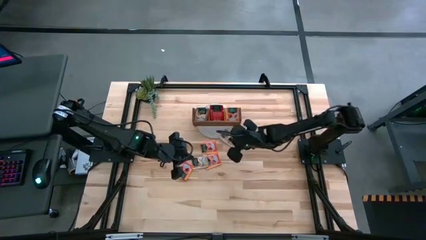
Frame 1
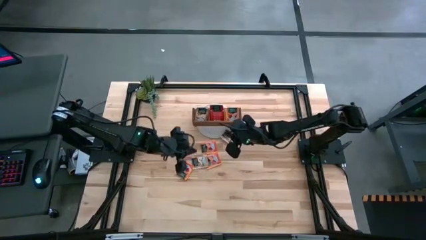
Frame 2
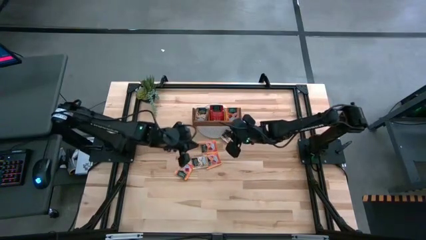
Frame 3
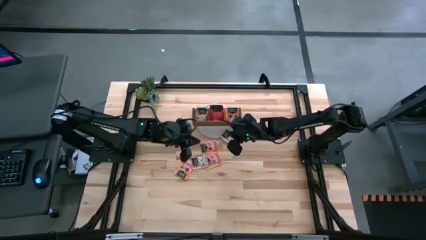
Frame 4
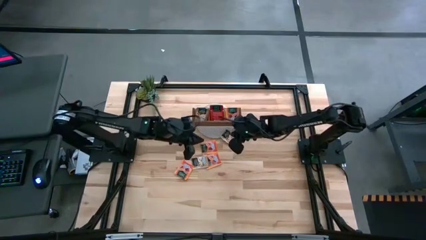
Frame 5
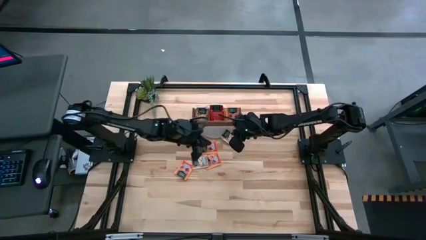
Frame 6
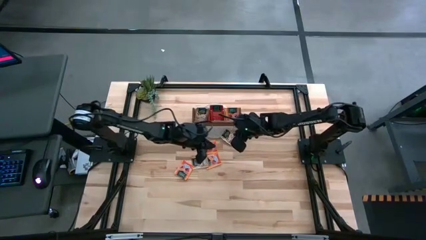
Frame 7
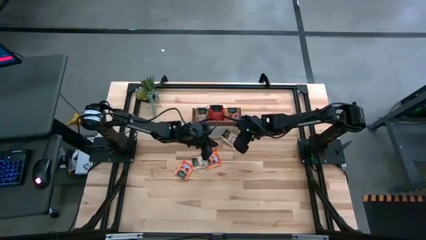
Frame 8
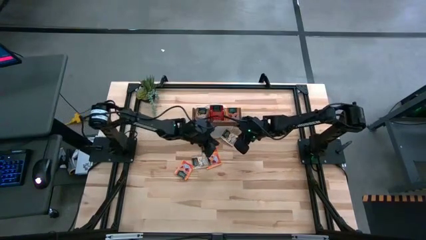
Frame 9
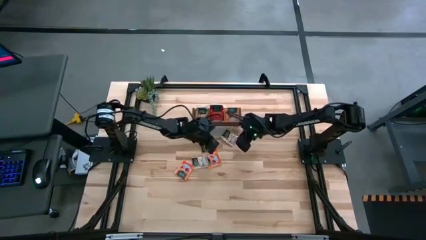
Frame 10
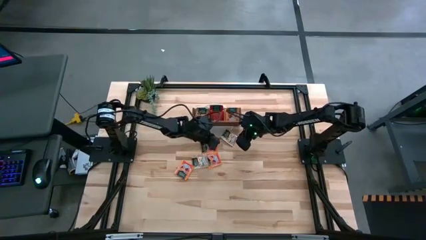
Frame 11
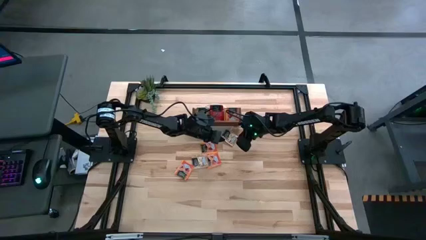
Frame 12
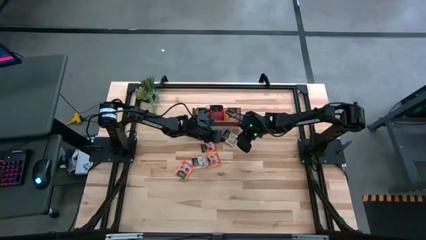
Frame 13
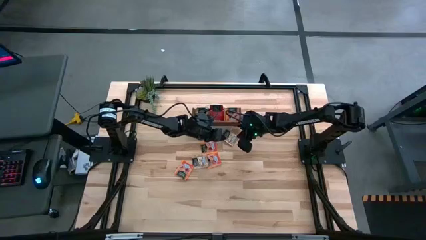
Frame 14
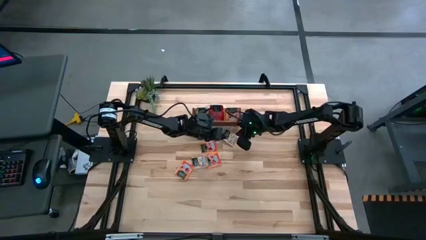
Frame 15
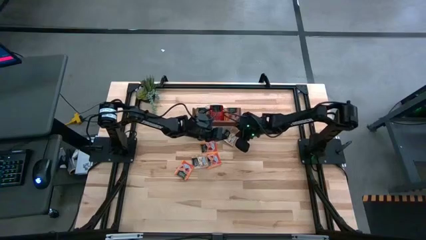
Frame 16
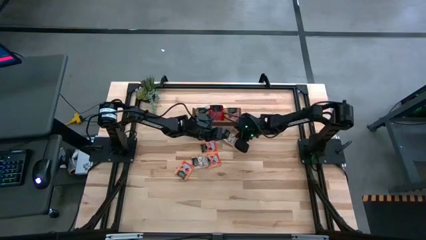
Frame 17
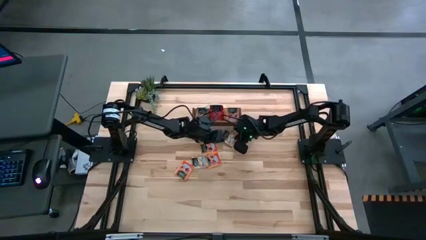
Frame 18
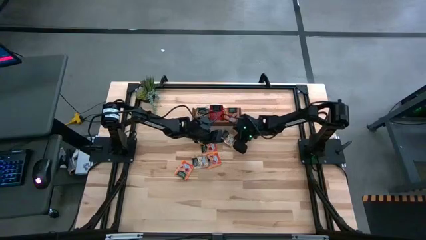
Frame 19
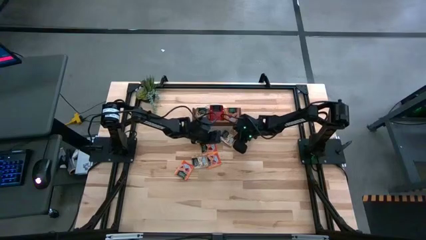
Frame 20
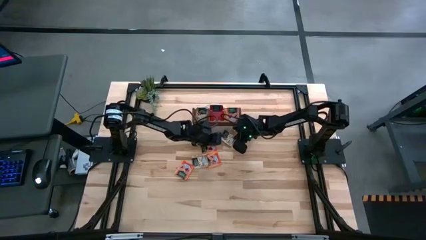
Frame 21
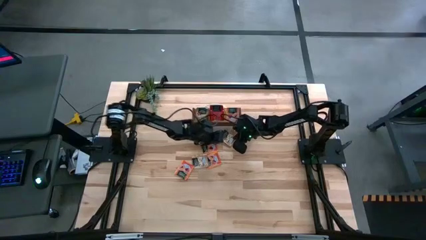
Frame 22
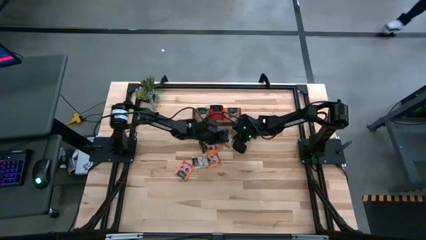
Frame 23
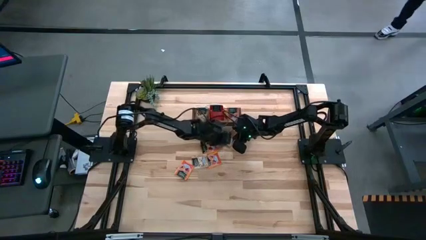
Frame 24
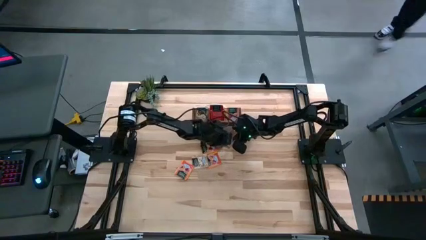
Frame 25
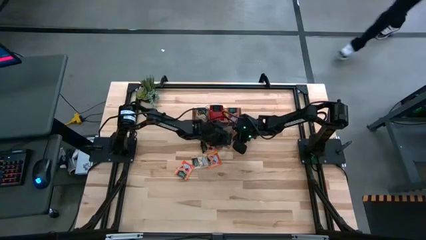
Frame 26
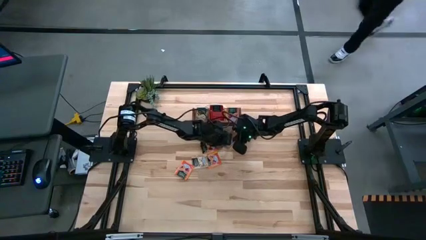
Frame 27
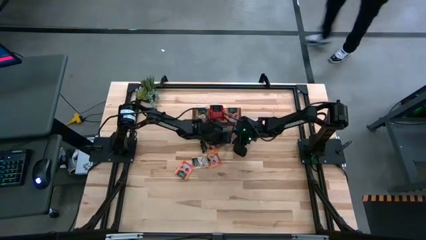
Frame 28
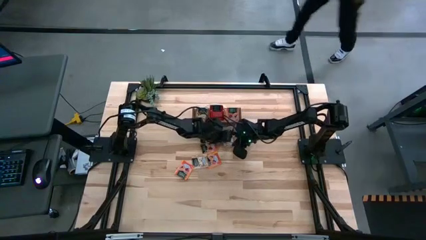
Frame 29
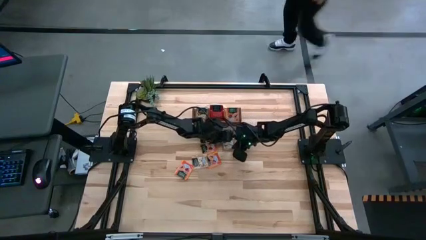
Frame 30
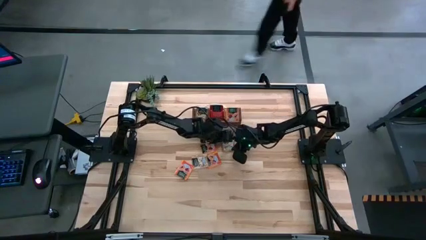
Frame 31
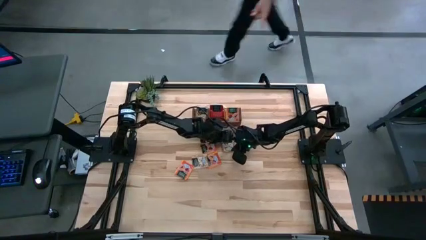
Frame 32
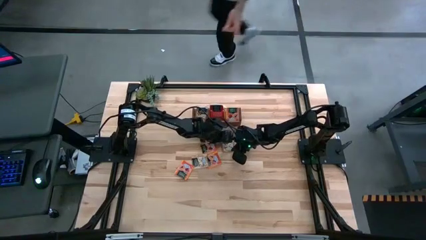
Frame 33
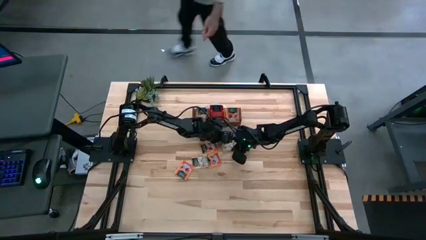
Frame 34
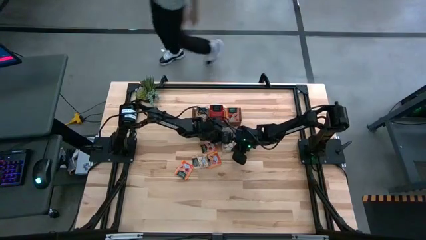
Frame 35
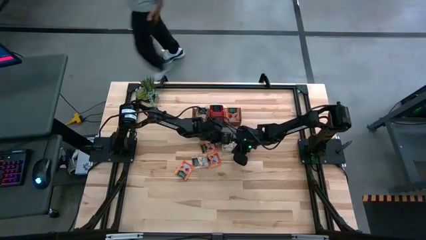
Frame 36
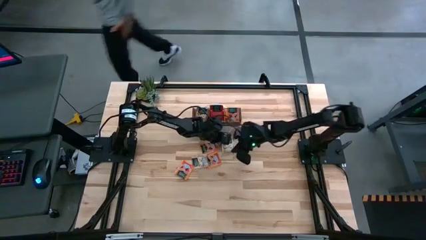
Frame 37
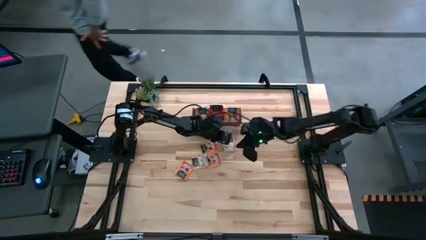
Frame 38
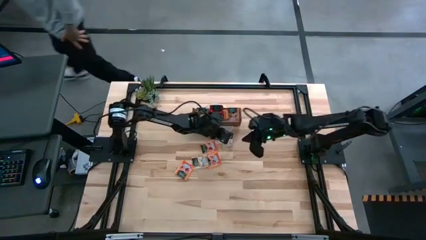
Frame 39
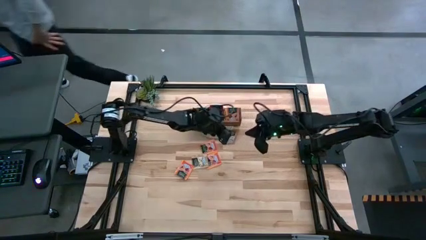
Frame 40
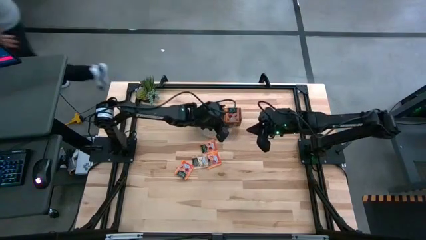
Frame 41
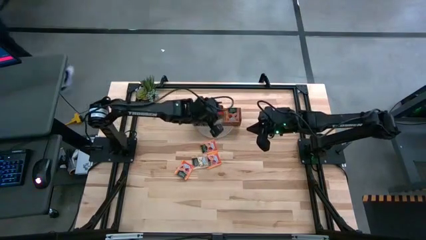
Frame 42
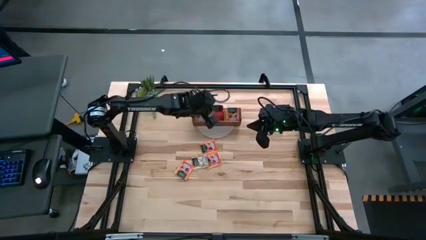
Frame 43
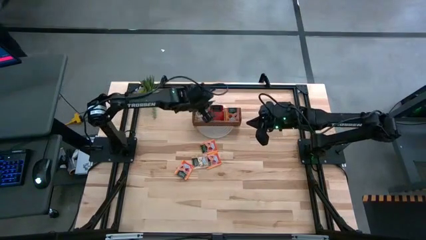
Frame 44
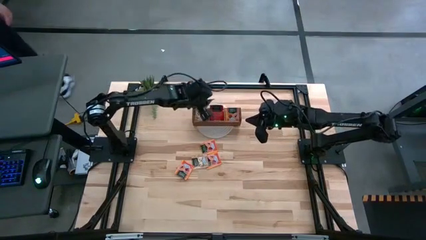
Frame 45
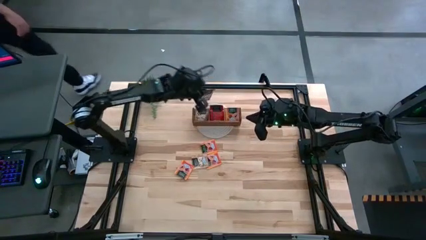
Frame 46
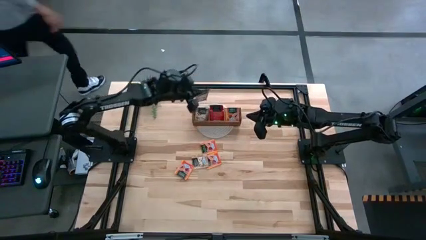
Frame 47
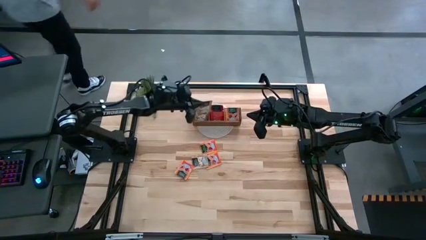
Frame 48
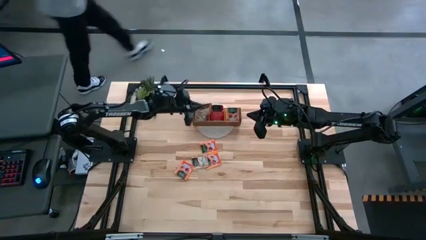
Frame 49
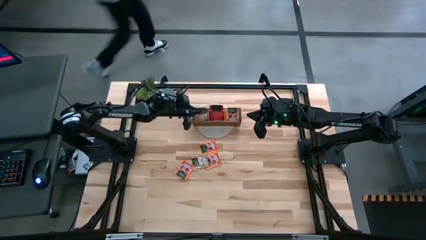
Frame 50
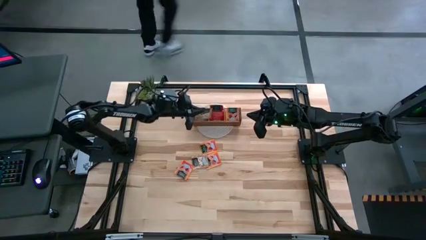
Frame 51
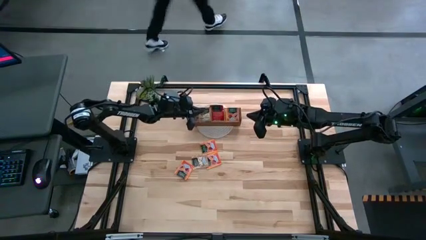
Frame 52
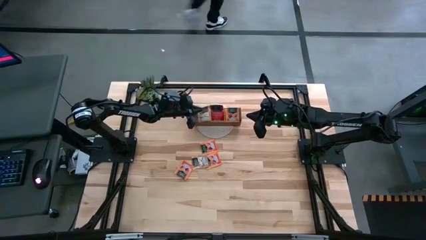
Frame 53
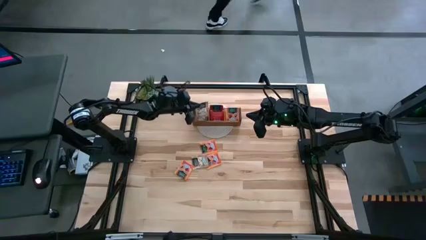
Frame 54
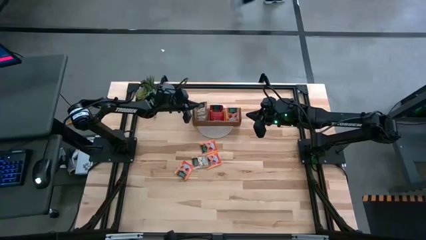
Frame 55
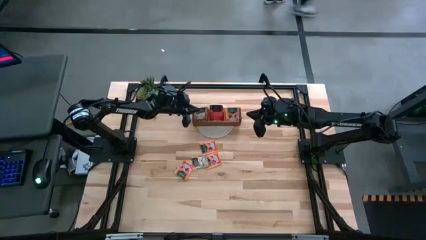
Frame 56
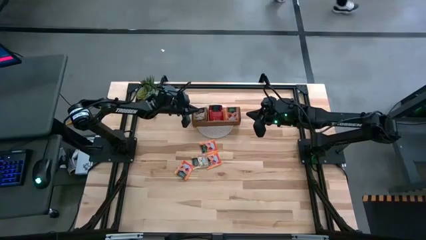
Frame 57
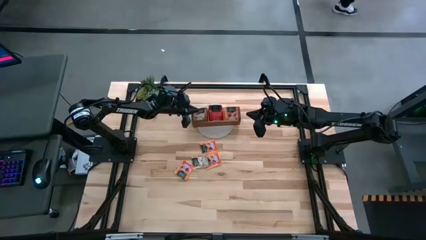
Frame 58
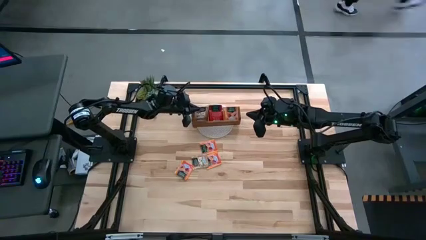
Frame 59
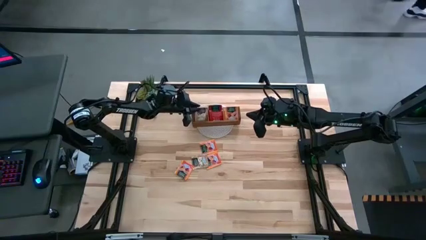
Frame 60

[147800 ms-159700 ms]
Task: Pick & Place Tea
Put the brown tea bag in the left section of the wooden organizer

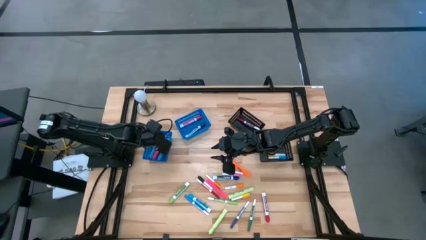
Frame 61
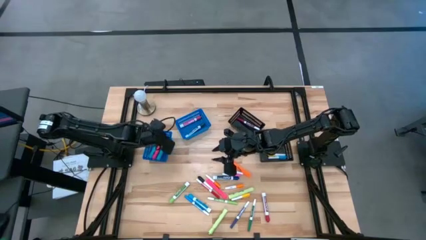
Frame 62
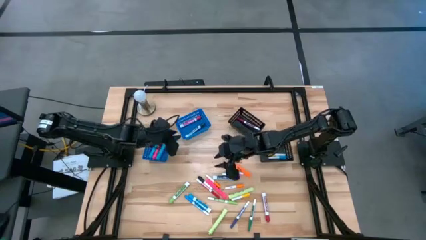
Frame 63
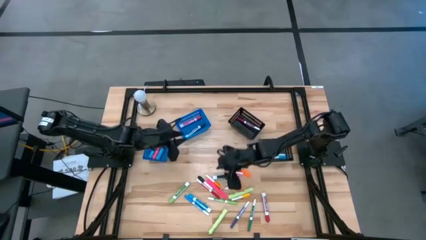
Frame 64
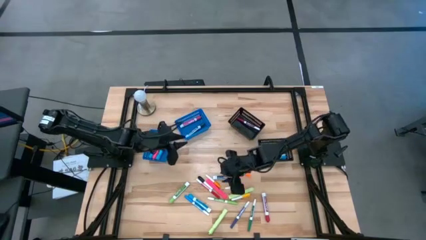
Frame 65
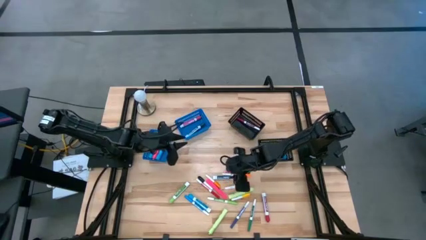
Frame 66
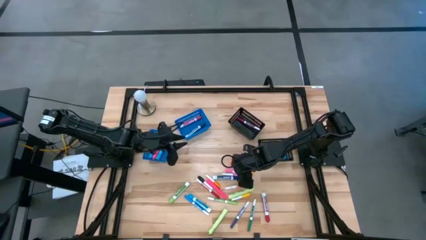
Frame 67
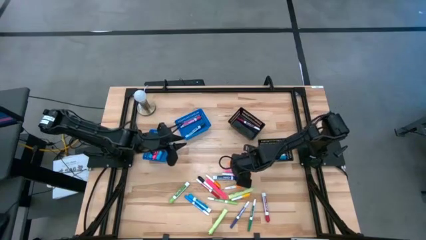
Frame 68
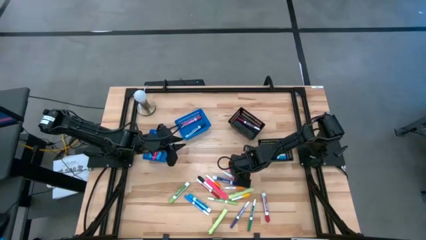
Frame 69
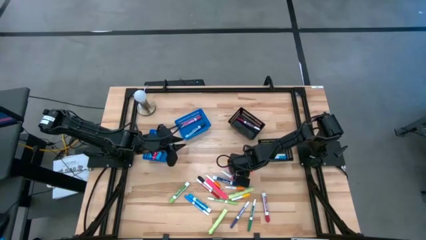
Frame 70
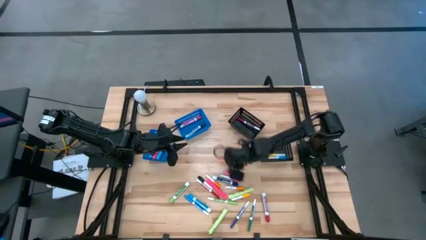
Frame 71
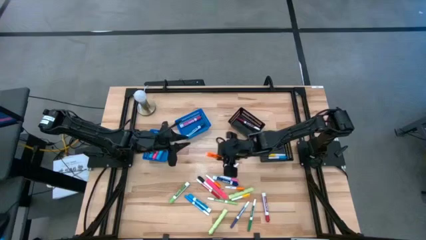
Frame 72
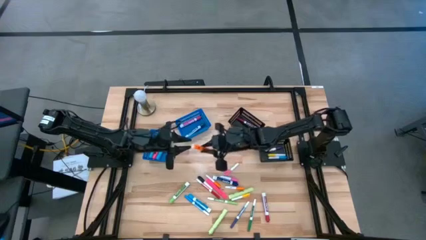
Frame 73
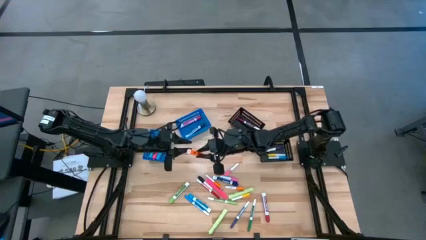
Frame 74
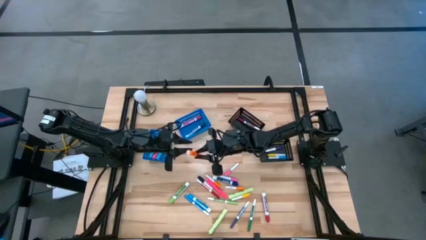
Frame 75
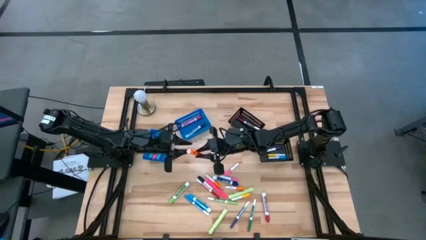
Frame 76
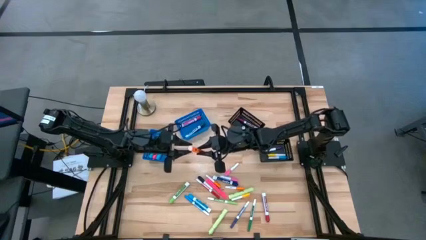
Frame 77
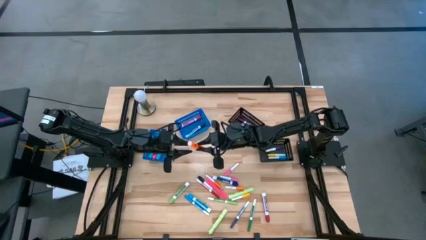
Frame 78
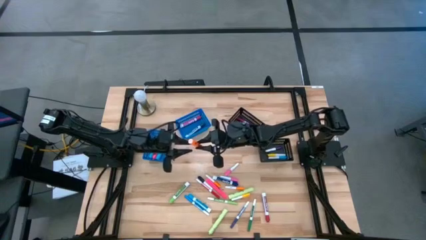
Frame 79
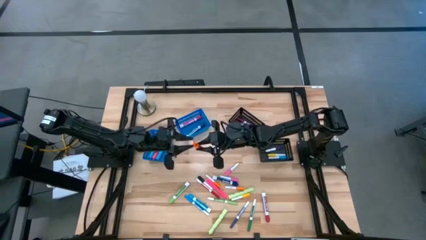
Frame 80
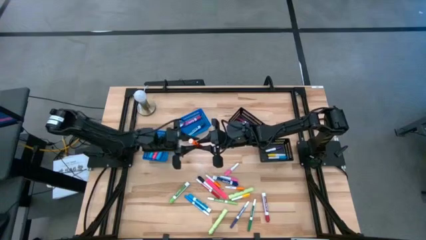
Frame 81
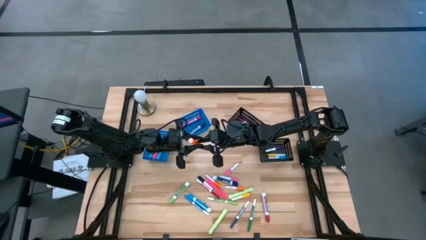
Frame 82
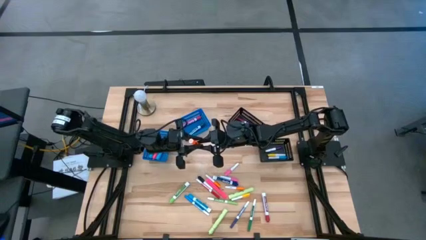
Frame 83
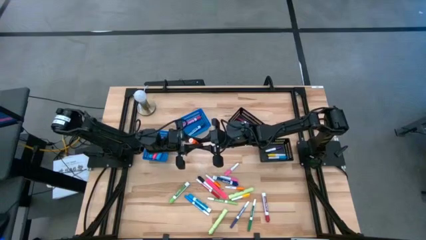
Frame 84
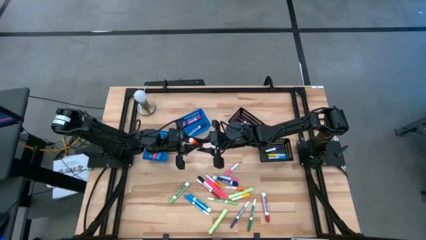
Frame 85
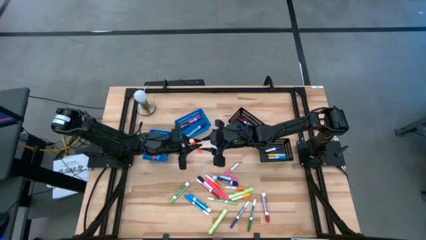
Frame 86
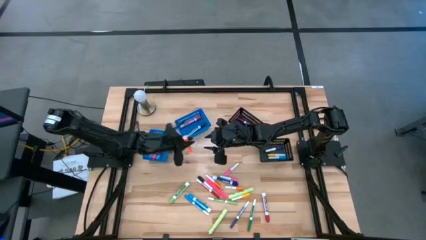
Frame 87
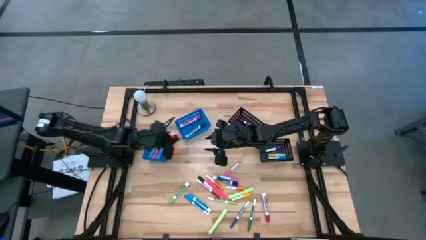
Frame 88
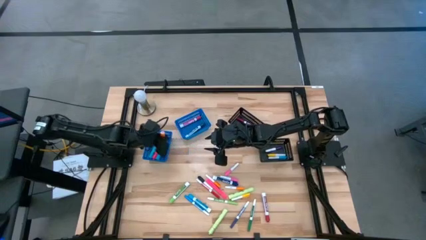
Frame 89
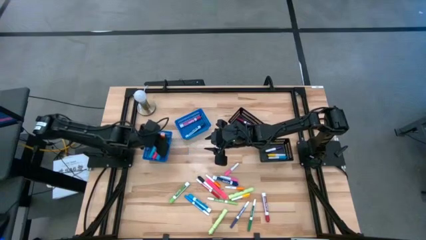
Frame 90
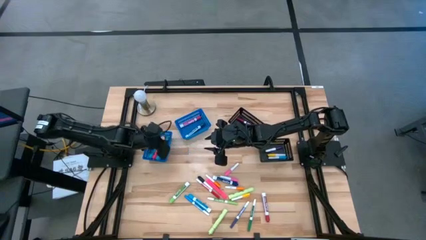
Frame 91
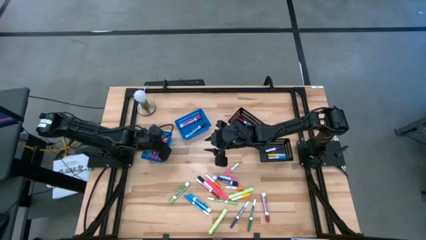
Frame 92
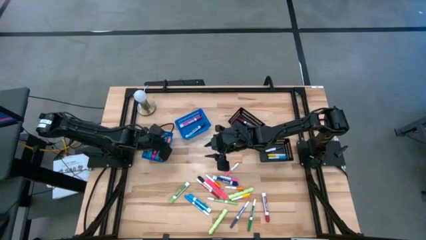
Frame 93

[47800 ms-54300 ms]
Task: Pick & Place Markers
Put the orange highlighter pen into the left blue bin
